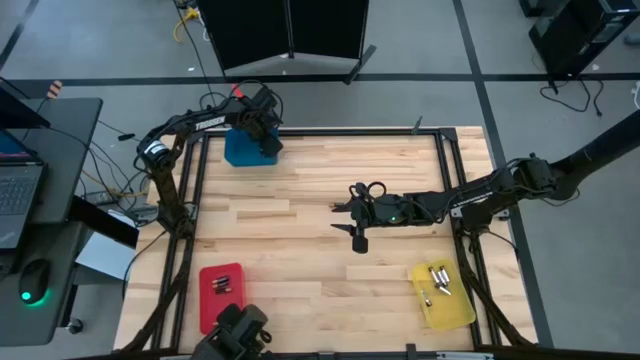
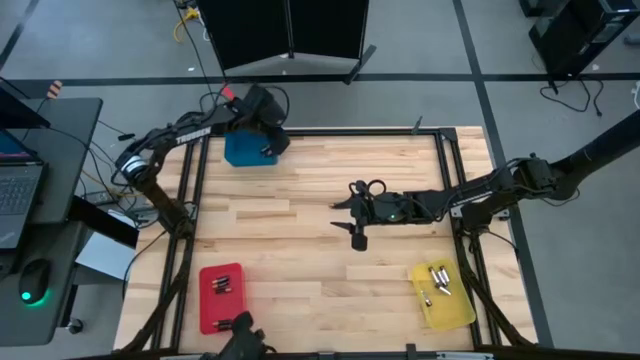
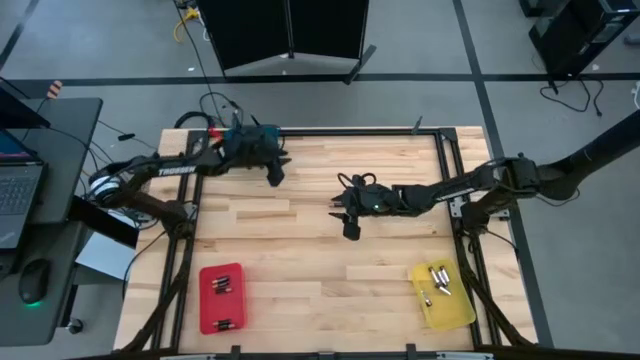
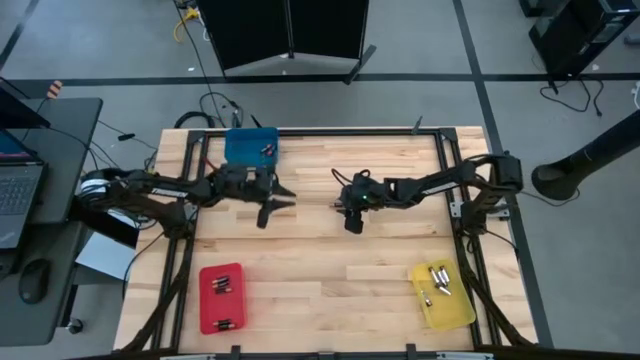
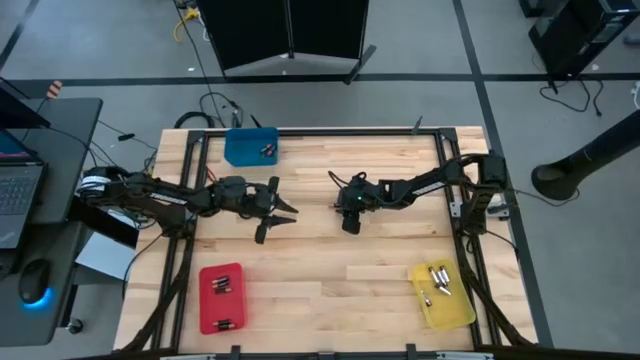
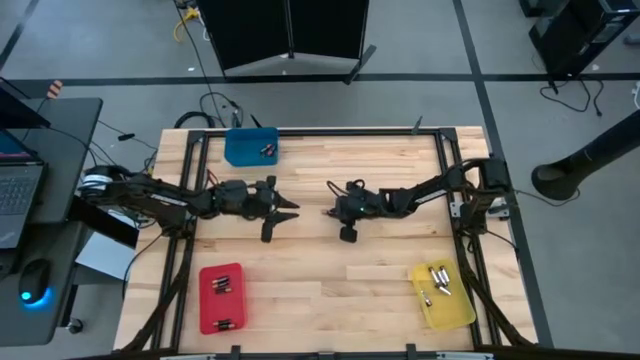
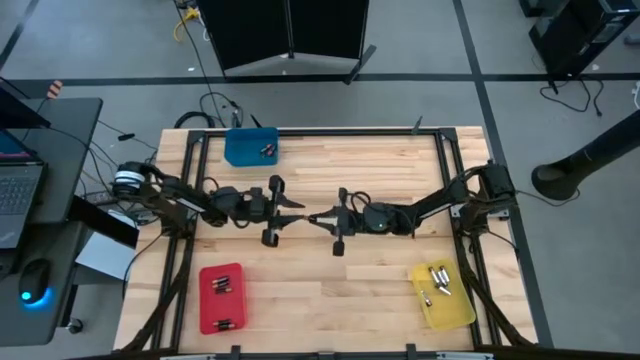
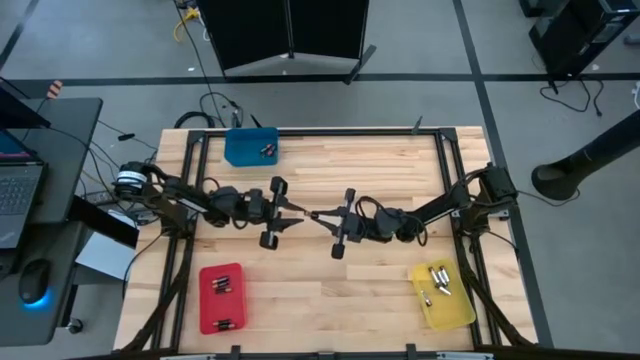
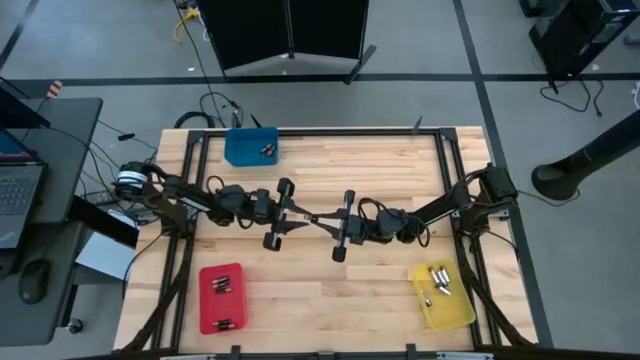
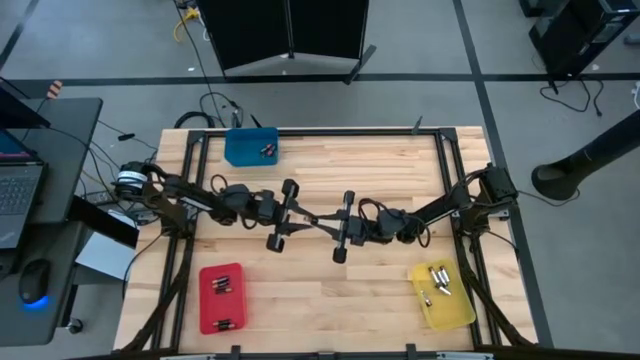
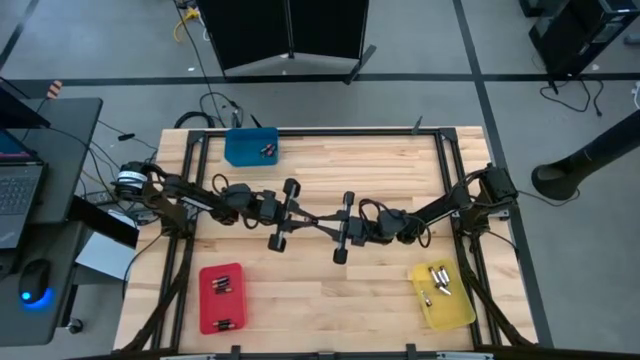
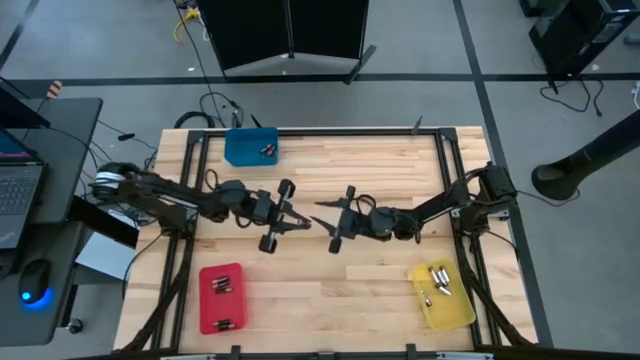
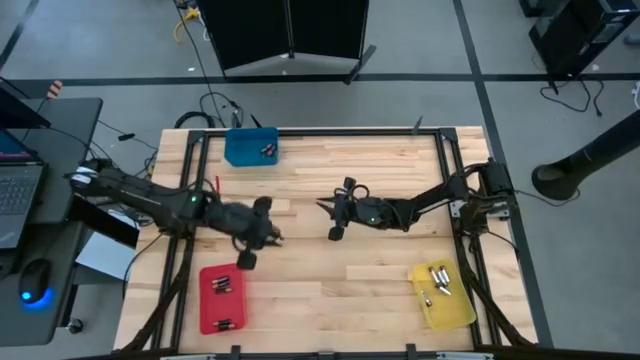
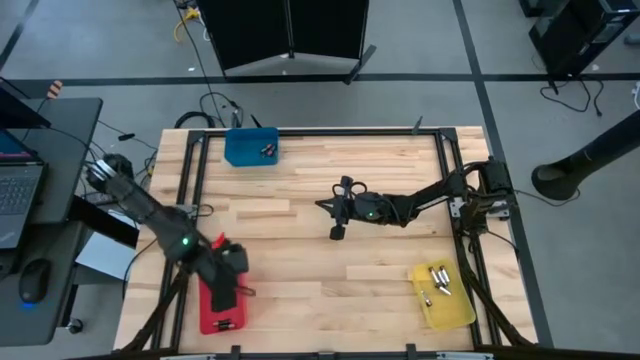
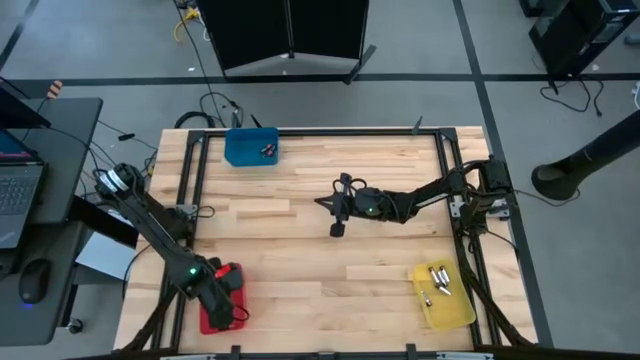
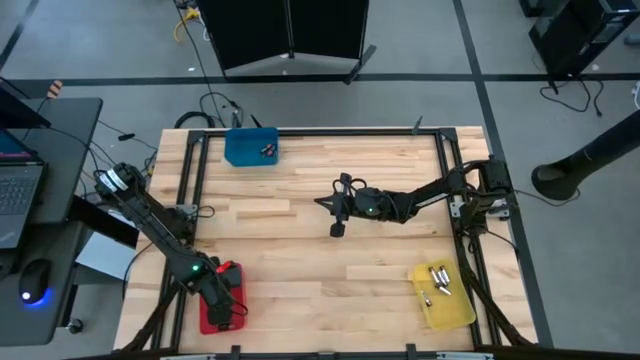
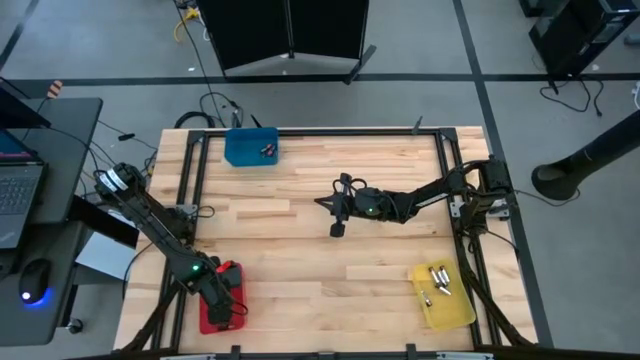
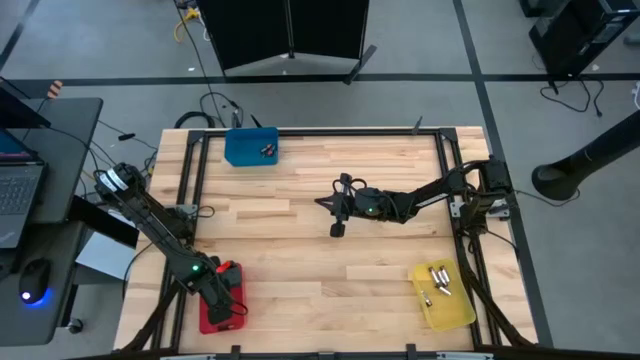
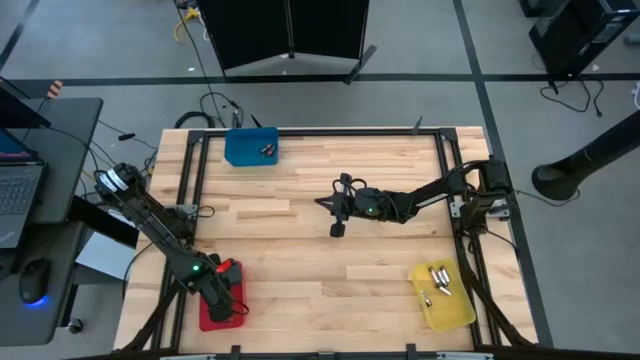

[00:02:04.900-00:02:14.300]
Task: Sort batteries
Put the brown battery into the red bin

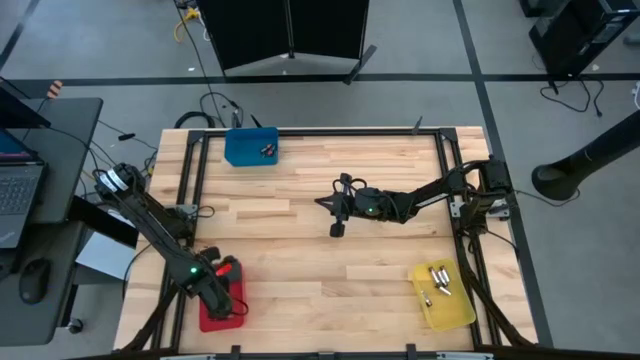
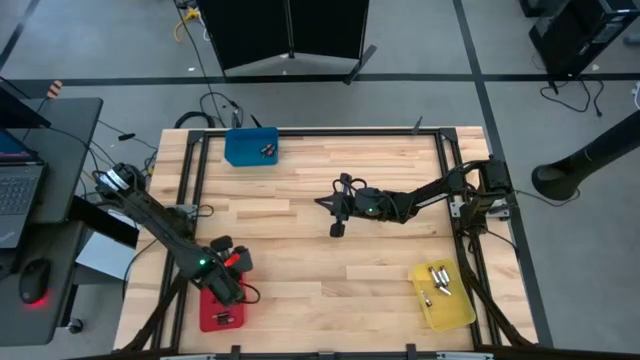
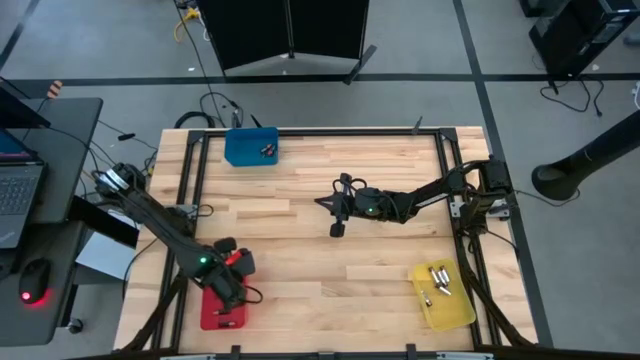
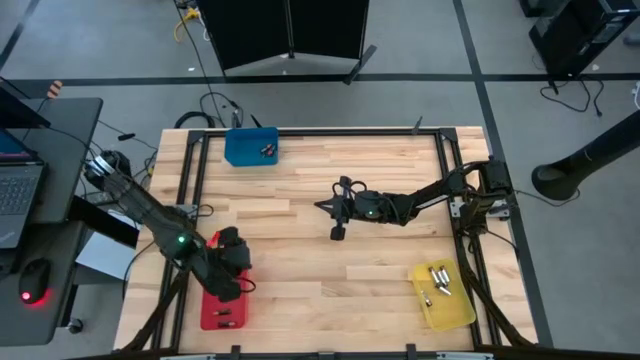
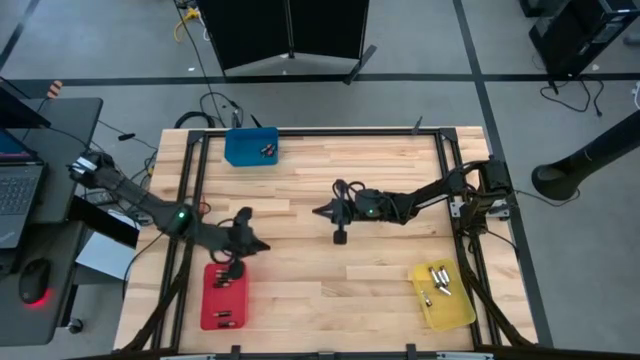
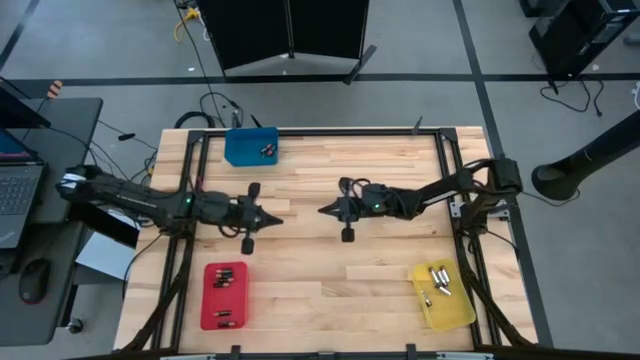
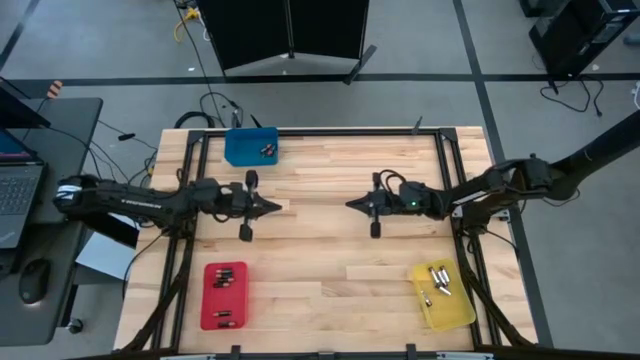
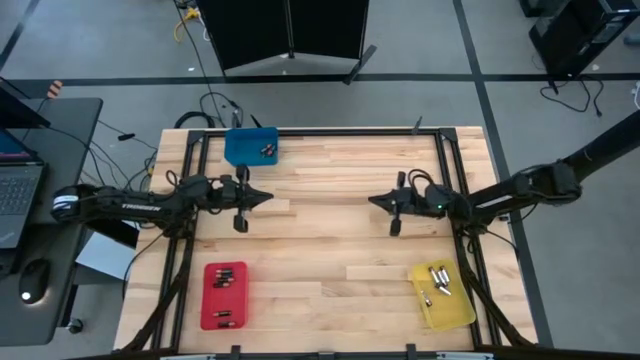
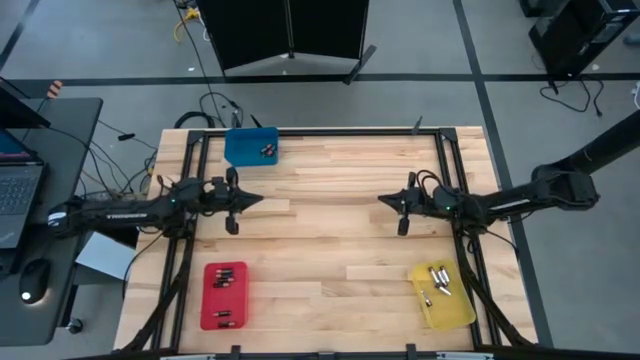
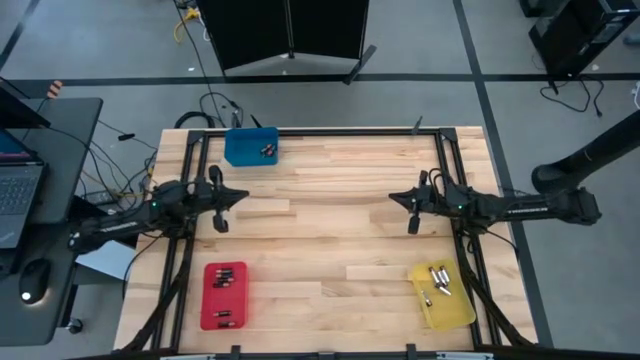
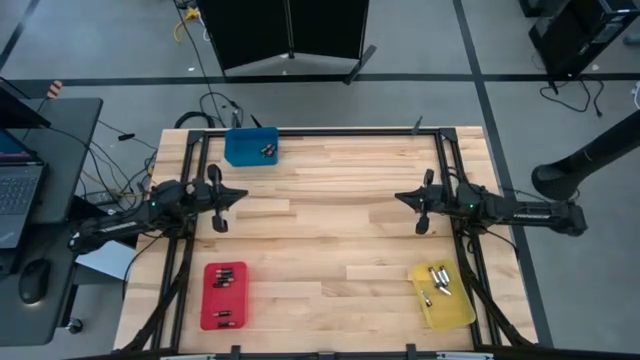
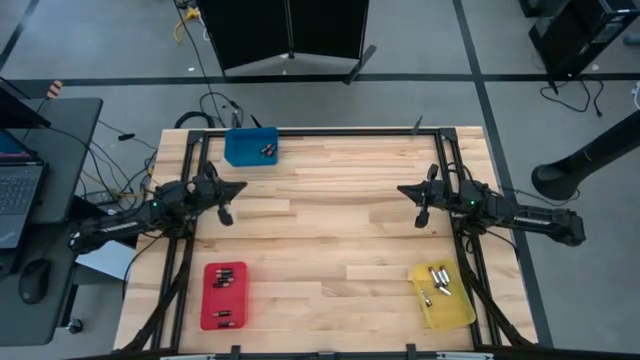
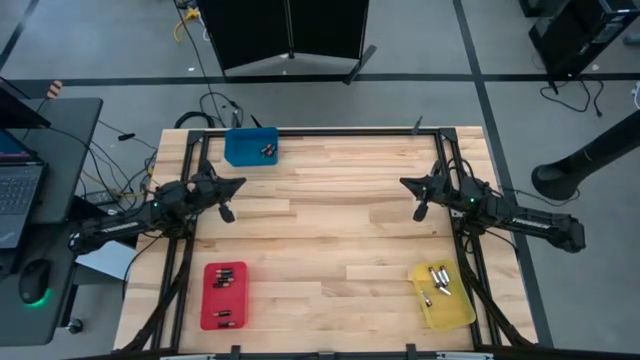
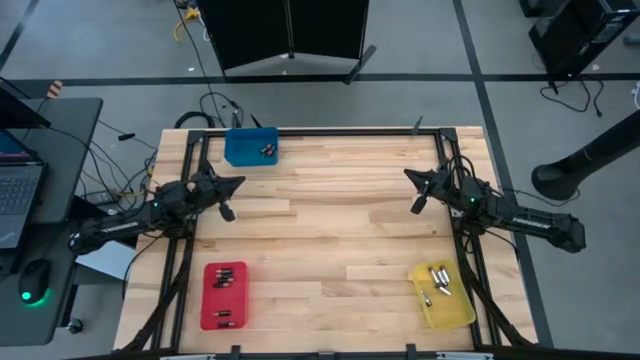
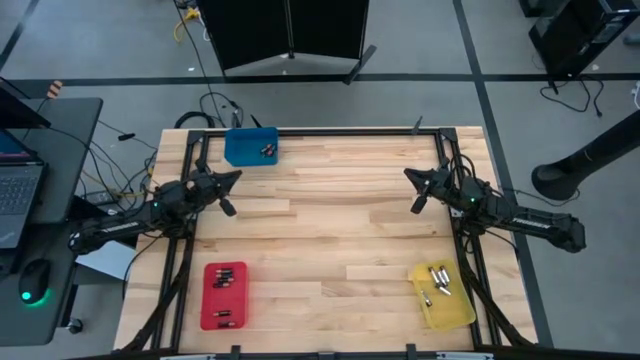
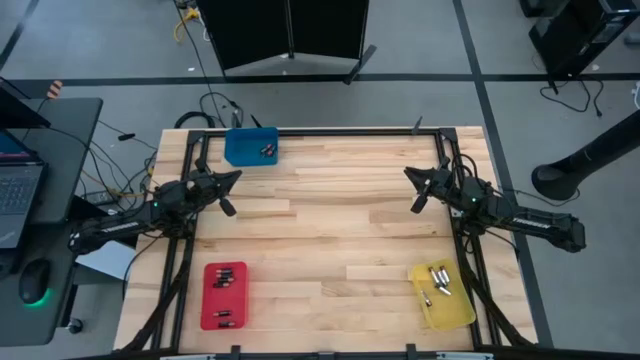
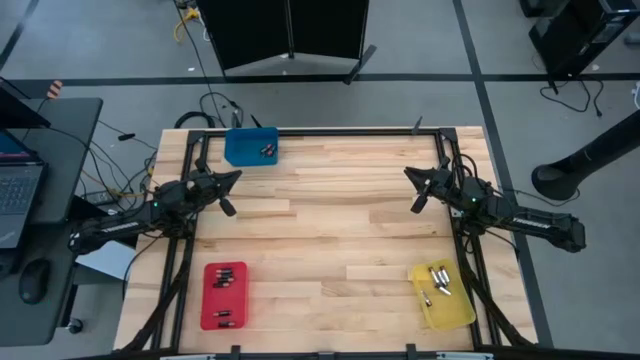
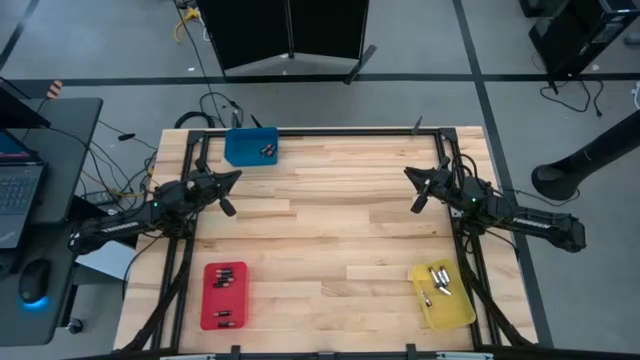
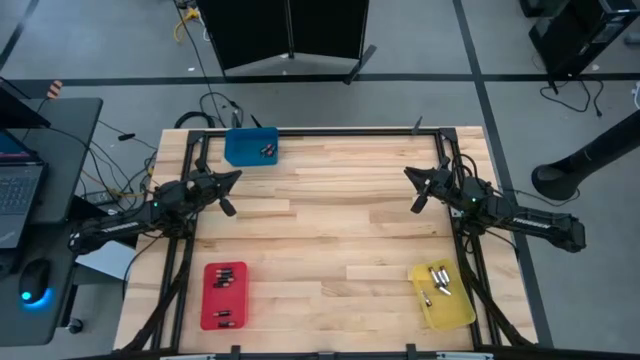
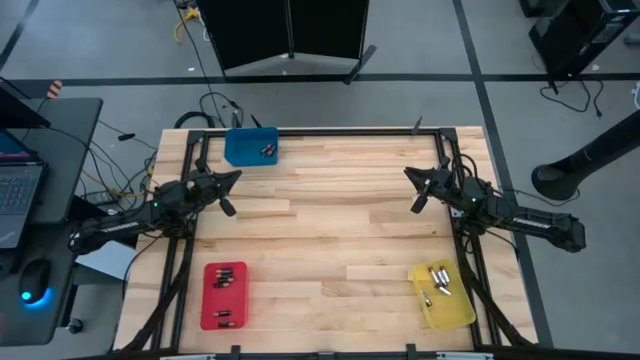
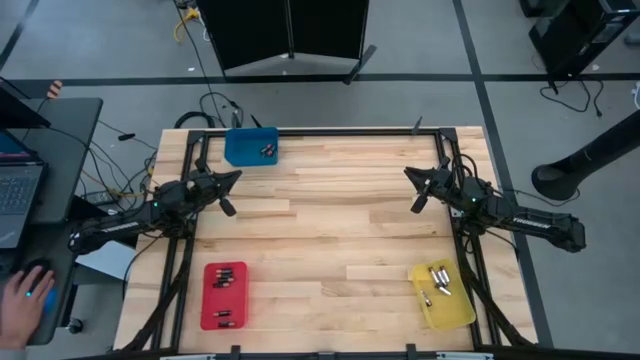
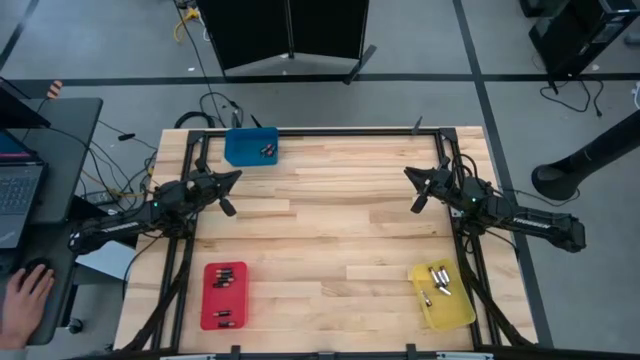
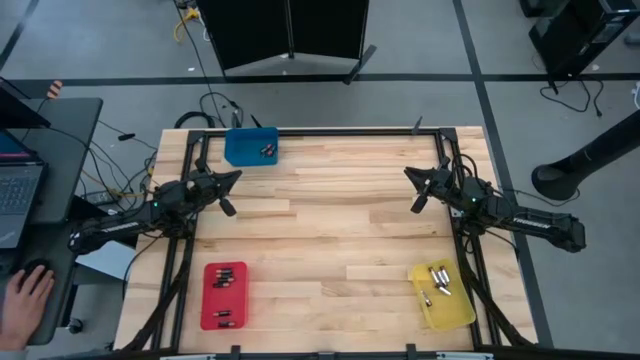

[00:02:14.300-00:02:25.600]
Return to Home Position

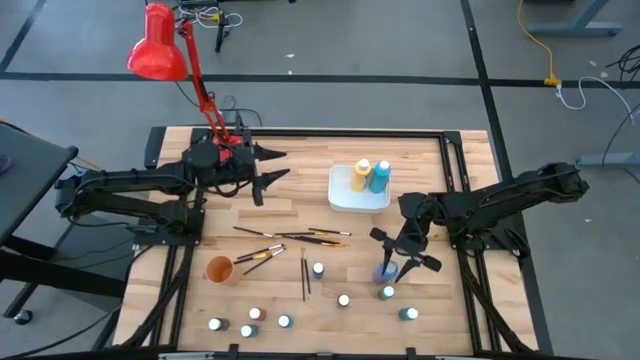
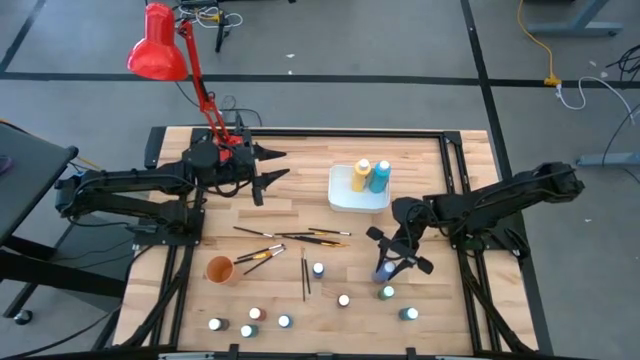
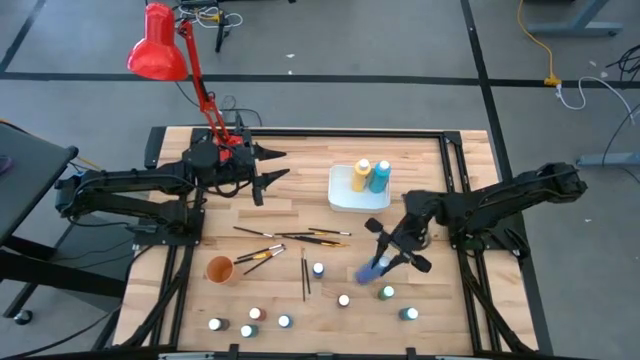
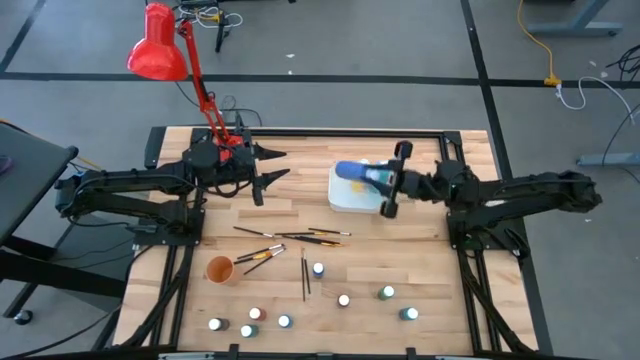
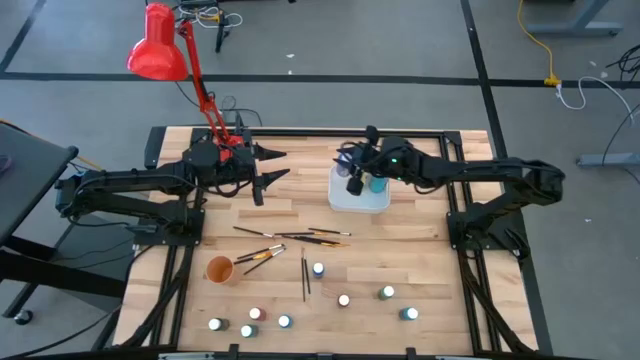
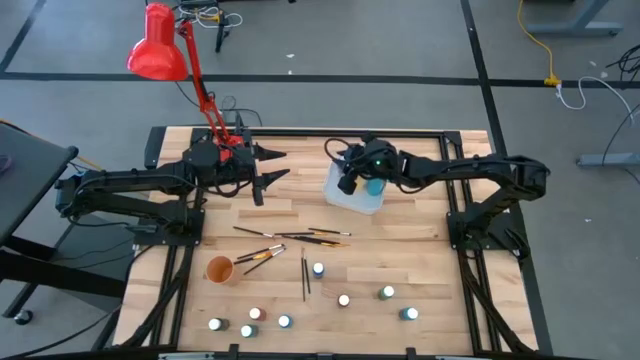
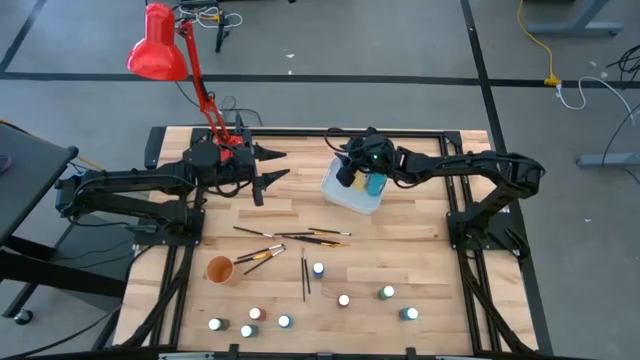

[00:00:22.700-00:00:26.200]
Task: Pick & Place Paint Supplies
Put the large blue paint bottle into the white bin
